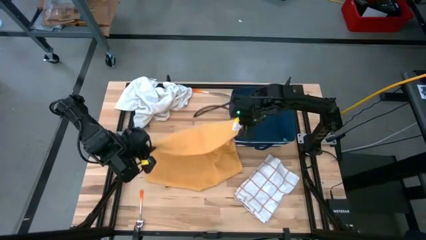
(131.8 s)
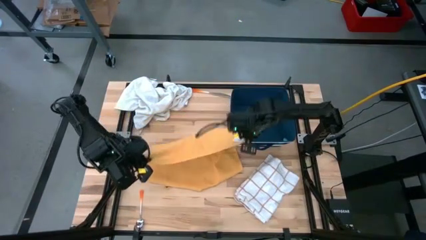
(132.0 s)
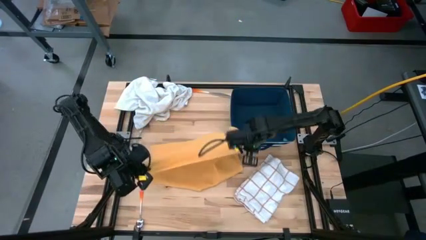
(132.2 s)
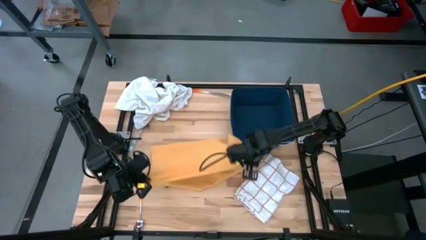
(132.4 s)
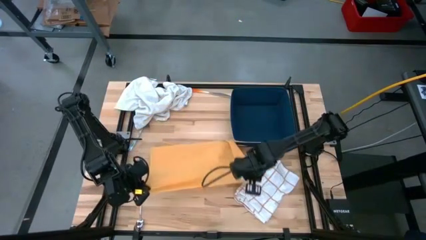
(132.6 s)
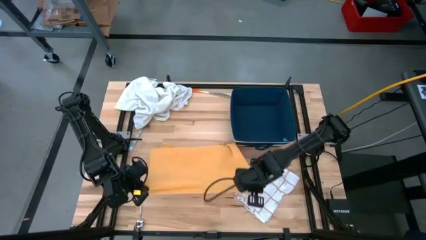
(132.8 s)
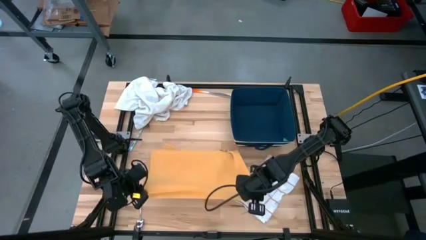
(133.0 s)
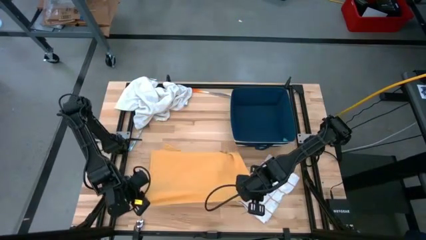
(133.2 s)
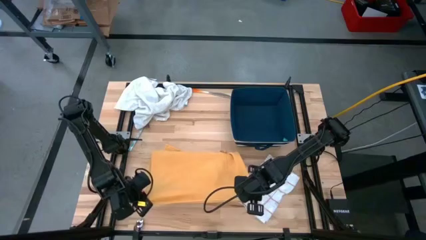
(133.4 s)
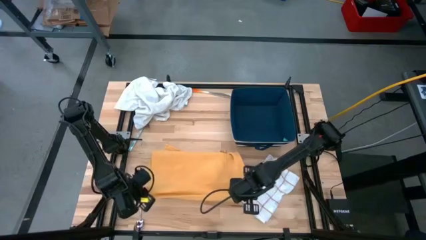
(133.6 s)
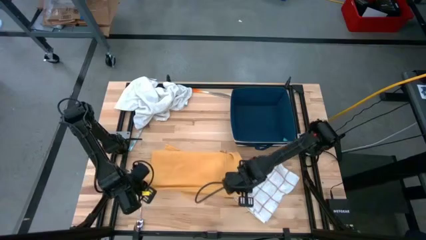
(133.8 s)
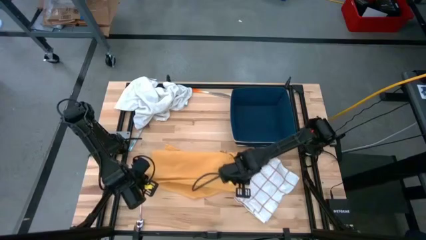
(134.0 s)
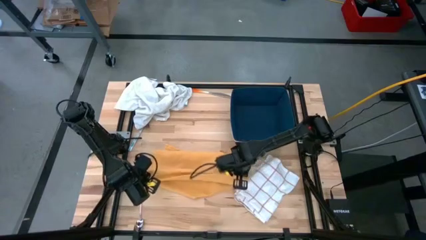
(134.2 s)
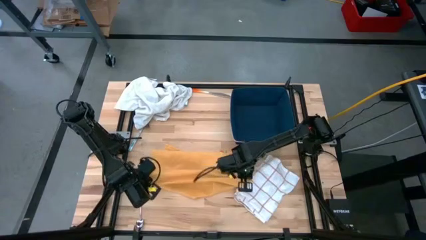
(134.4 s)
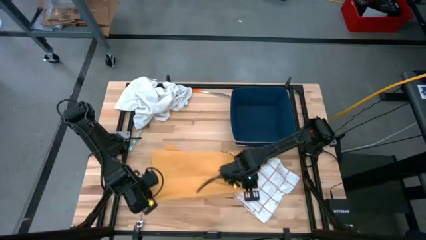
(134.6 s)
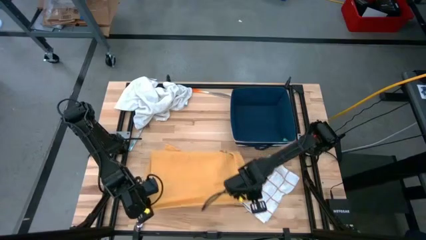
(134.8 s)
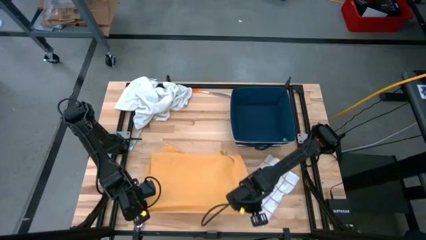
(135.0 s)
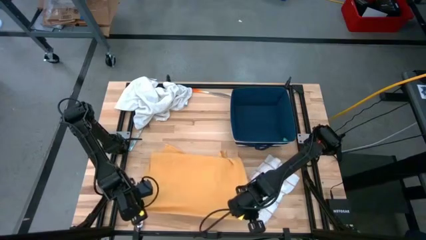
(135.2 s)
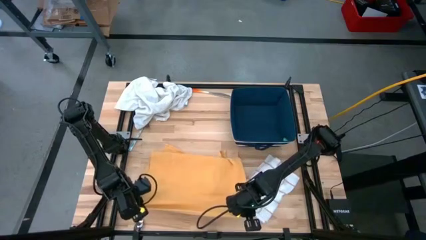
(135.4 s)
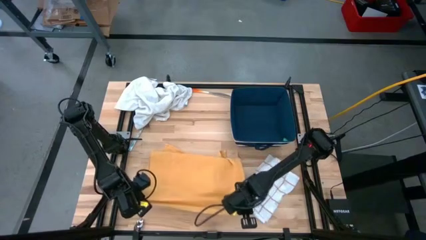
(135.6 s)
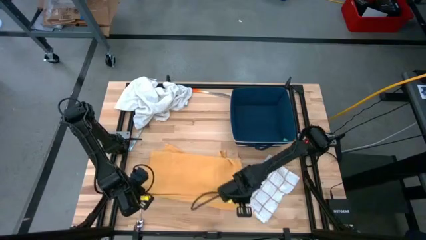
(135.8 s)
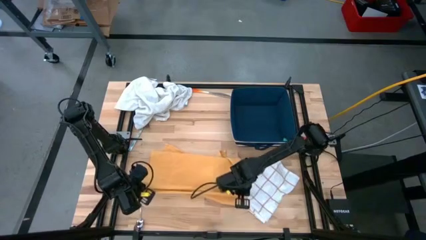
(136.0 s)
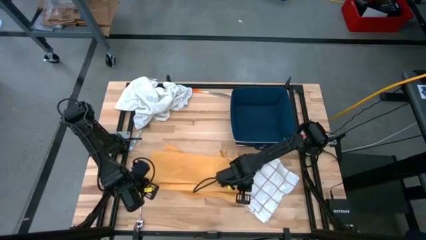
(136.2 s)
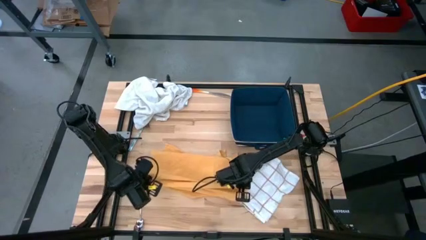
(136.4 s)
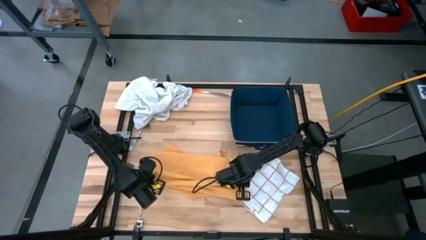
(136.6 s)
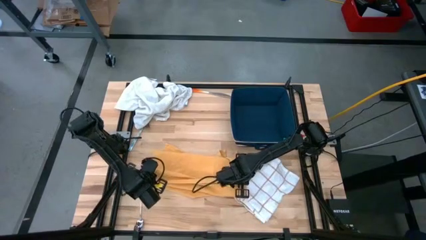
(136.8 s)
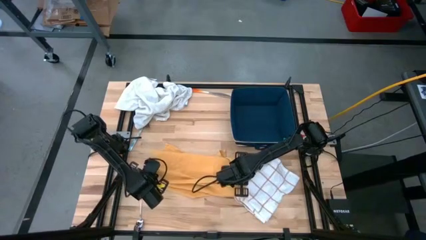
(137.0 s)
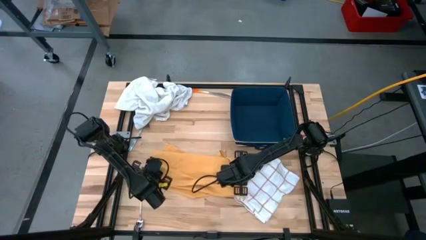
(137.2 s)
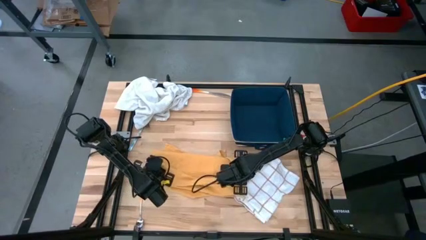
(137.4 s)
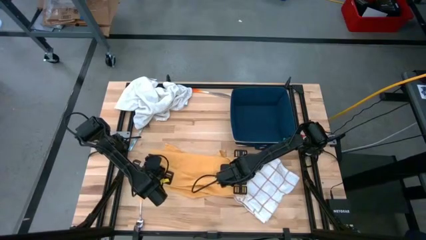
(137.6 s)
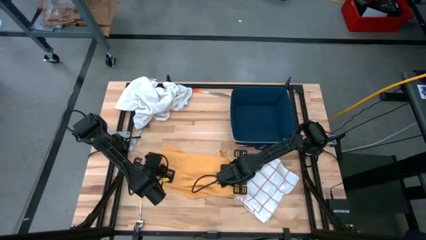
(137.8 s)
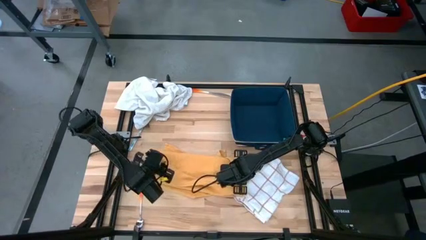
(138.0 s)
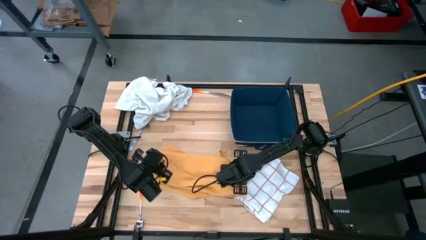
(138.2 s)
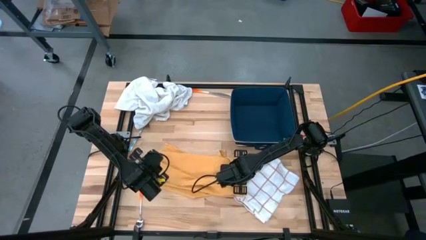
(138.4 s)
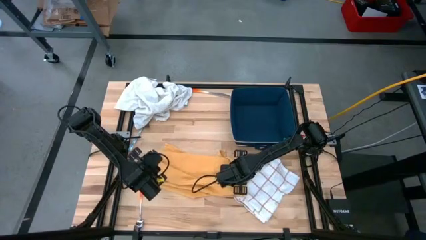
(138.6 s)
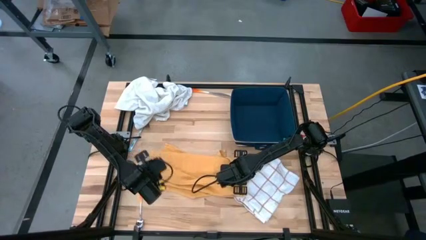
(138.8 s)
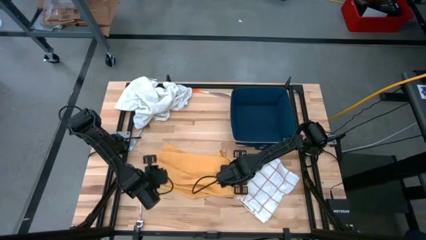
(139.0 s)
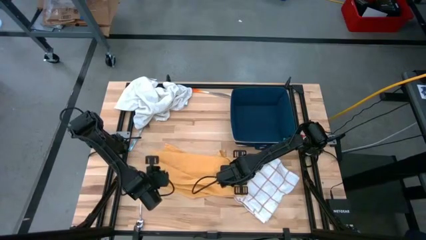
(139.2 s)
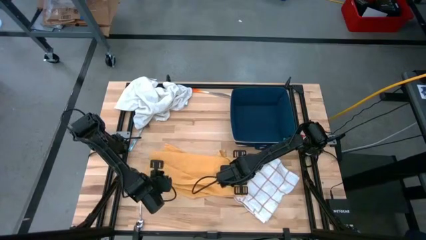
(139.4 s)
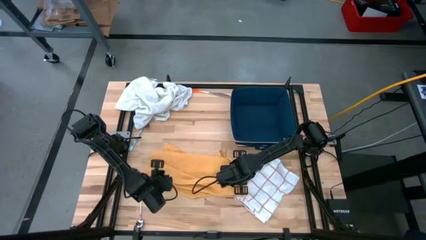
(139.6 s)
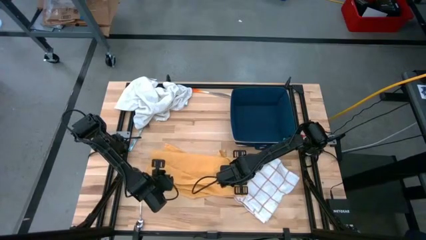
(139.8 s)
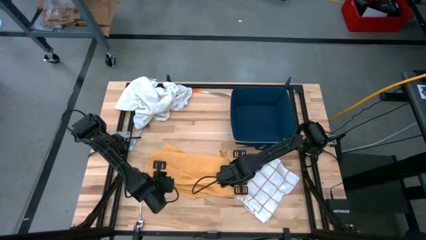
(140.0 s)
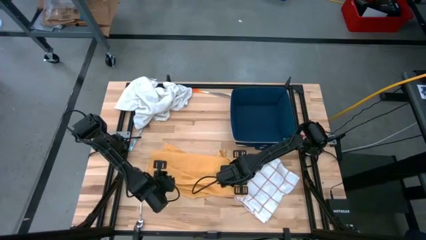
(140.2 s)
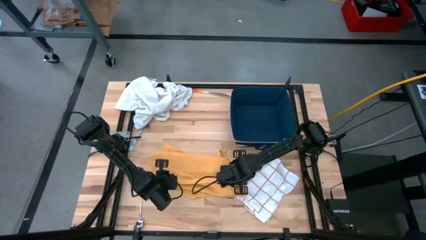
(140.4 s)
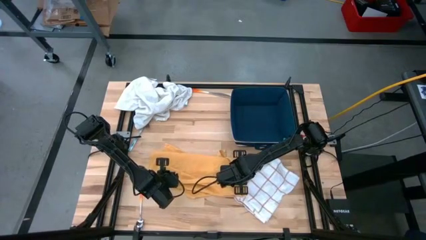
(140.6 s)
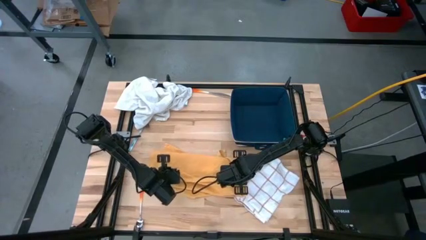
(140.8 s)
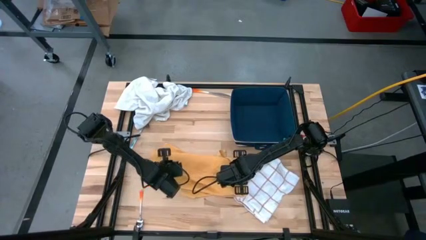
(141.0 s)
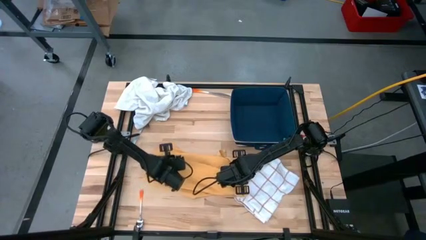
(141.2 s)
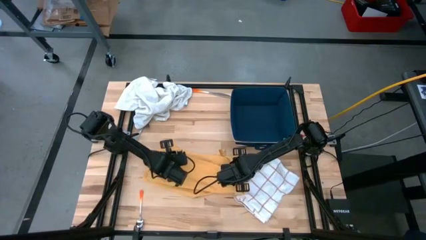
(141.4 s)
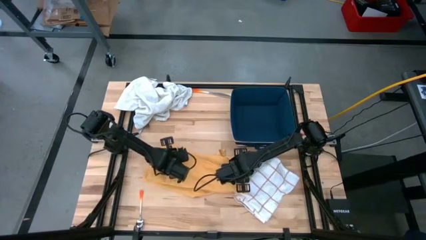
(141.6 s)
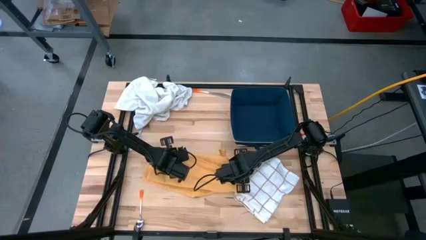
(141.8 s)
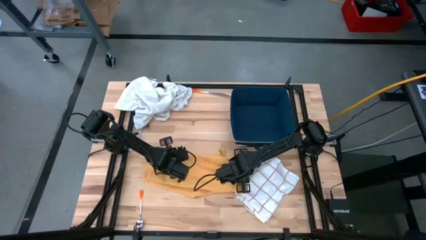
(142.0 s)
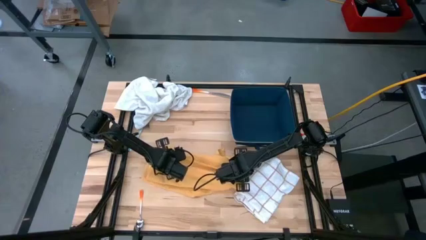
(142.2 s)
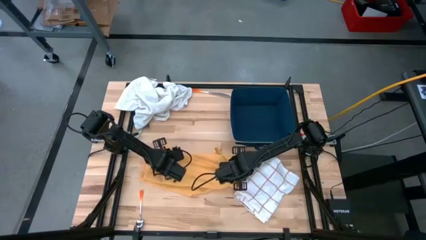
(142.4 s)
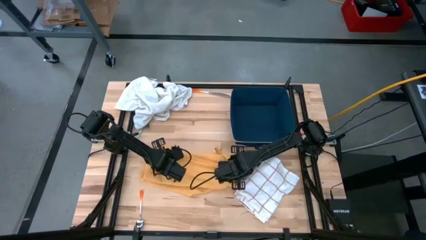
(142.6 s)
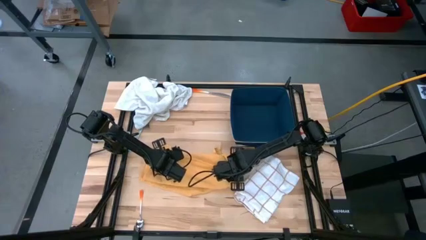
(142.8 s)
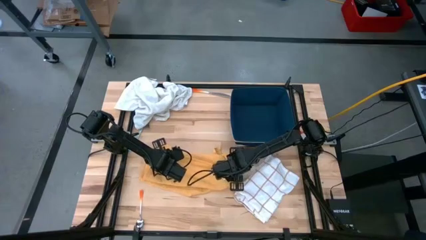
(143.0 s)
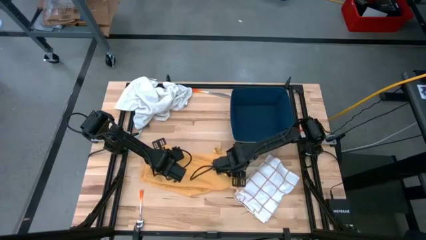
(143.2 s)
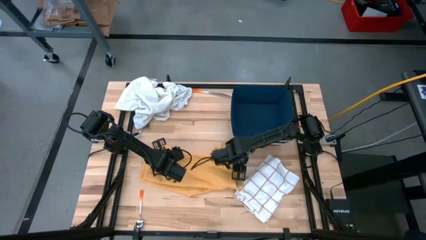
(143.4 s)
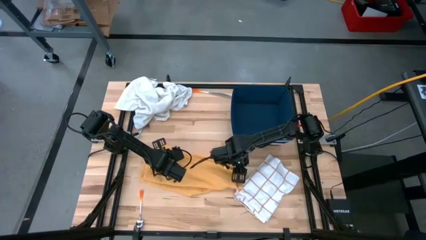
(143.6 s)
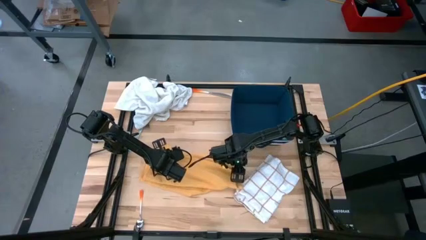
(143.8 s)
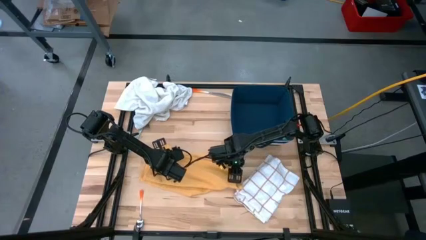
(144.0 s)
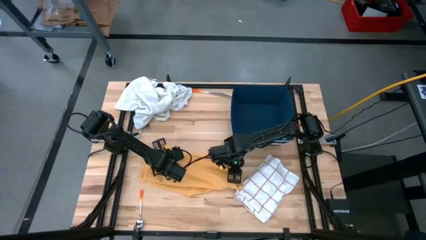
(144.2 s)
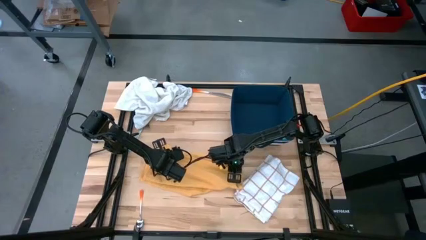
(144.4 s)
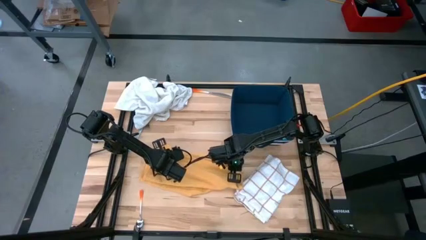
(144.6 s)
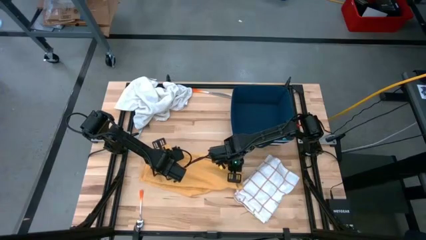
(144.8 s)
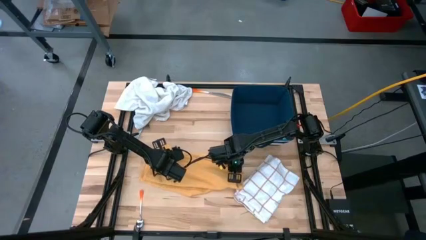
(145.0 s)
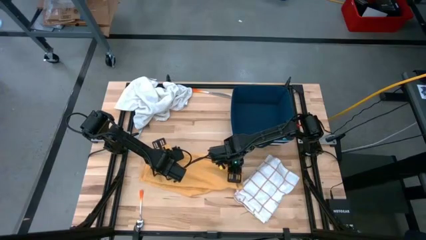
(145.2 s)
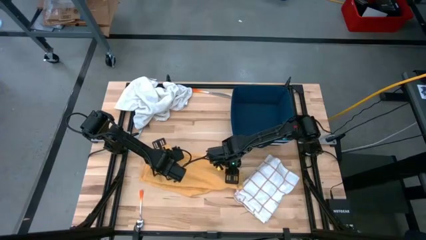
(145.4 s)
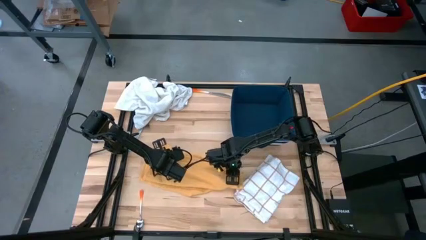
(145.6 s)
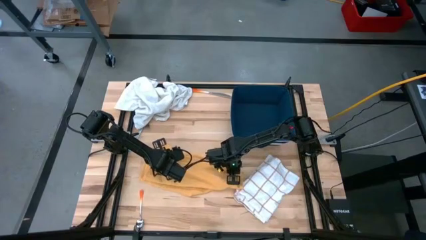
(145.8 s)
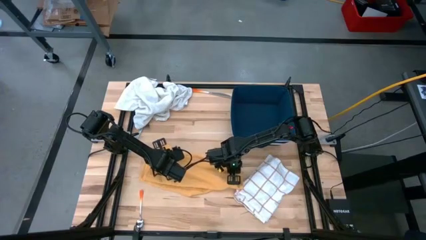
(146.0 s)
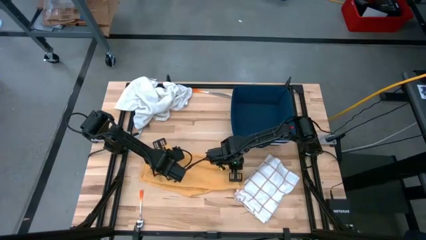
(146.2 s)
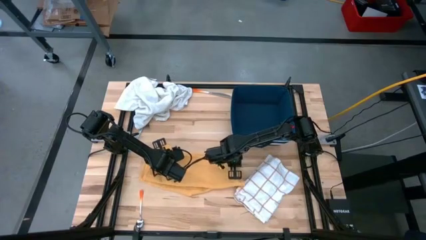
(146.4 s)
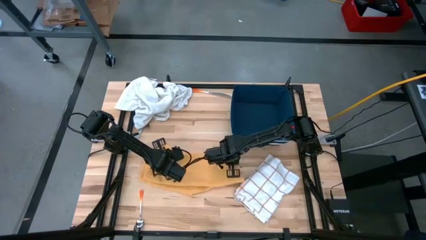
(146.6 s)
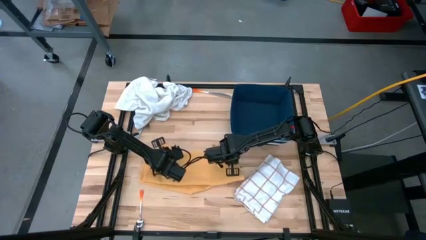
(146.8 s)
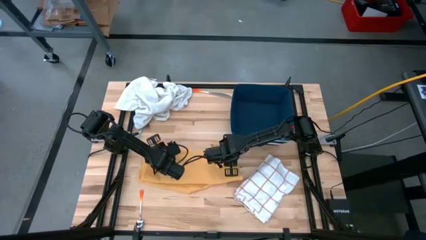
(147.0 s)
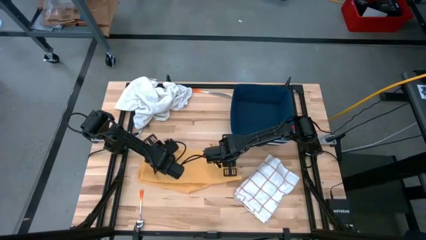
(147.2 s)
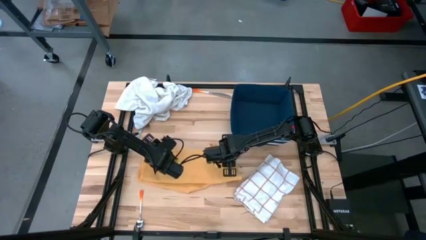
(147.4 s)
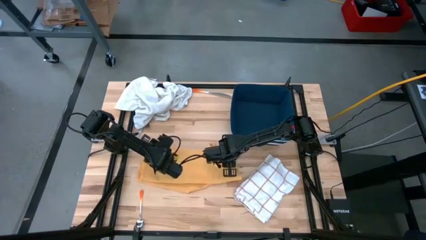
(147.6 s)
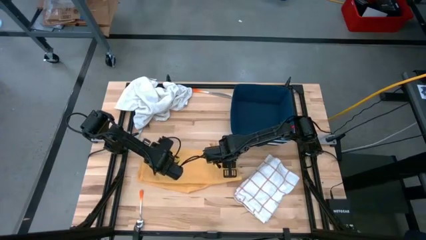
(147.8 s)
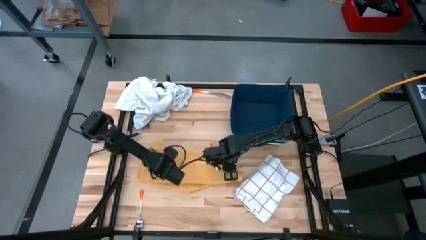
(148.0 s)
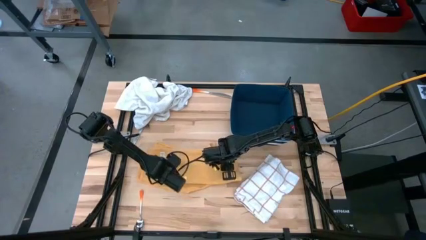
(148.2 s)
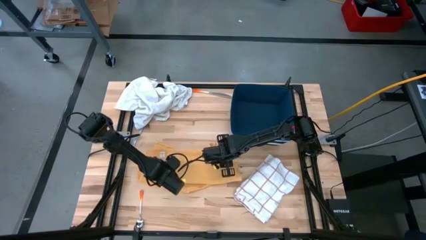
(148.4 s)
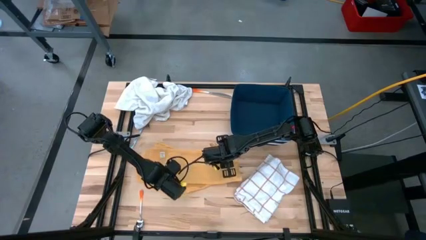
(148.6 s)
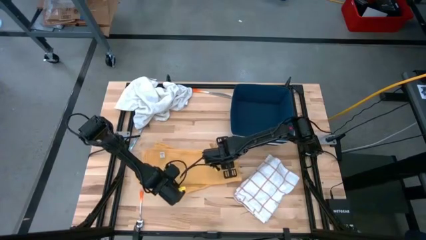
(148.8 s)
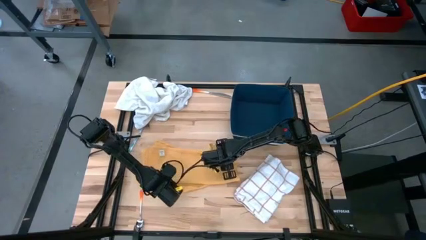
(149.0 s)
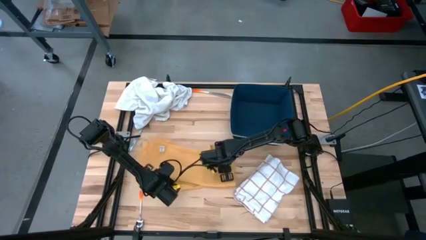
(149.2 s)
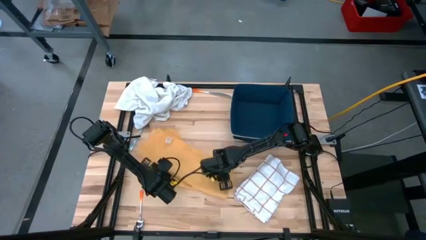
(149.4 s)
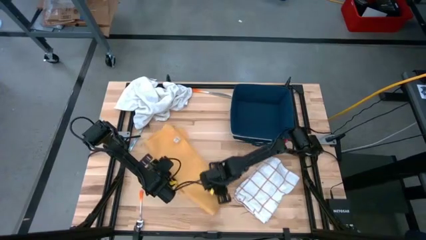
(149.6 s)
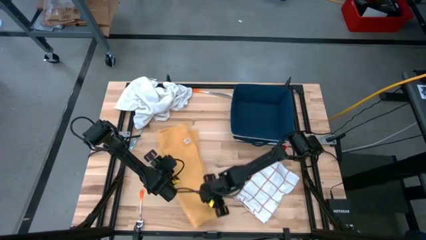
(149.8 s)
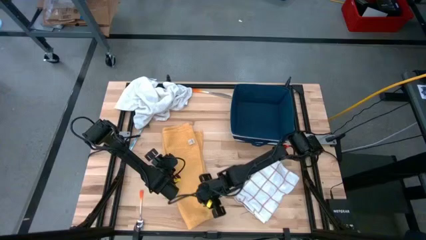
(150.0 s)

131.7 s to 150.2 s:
Task: Fold towel
Fold the yellow towel
